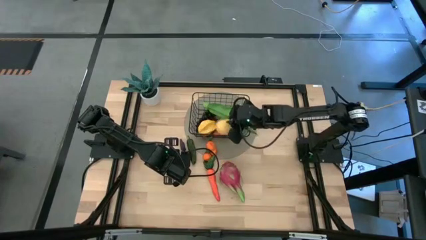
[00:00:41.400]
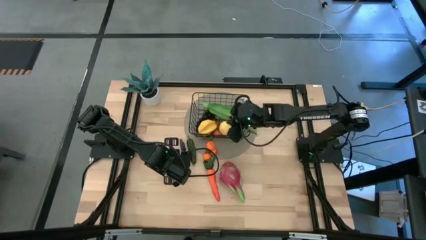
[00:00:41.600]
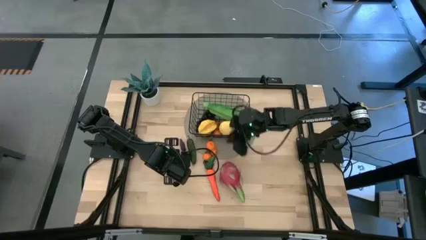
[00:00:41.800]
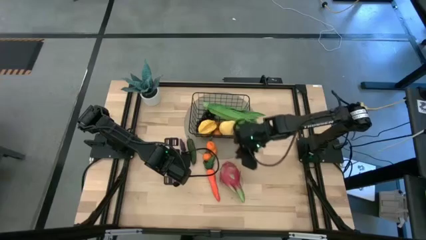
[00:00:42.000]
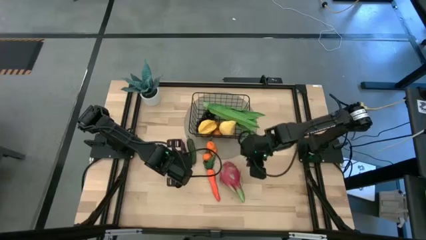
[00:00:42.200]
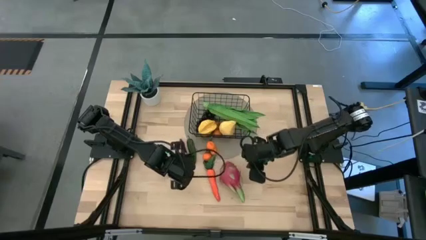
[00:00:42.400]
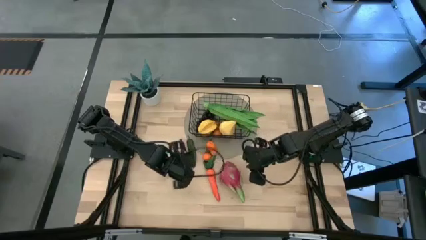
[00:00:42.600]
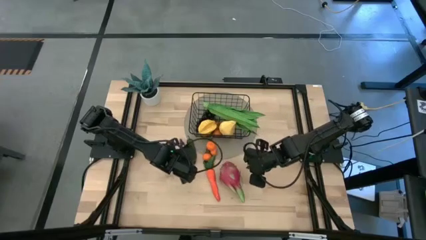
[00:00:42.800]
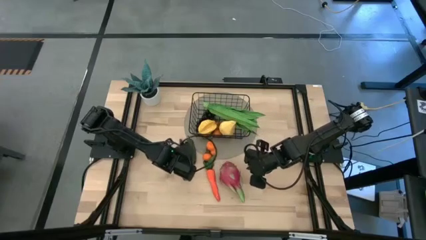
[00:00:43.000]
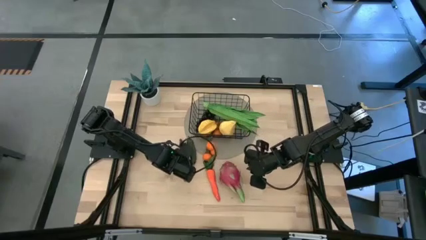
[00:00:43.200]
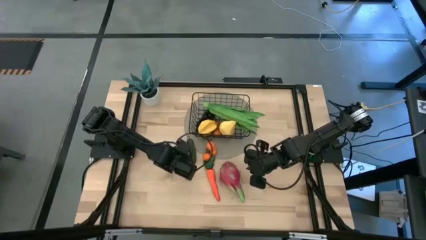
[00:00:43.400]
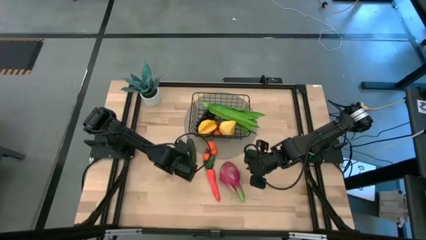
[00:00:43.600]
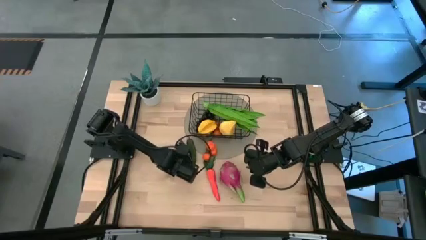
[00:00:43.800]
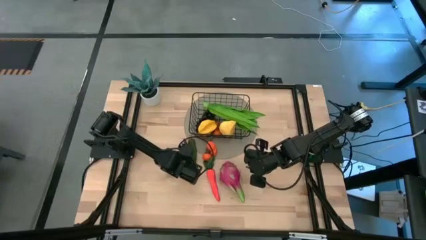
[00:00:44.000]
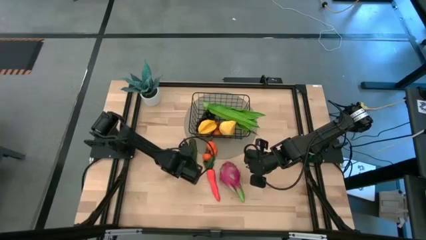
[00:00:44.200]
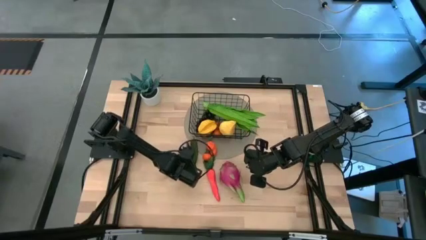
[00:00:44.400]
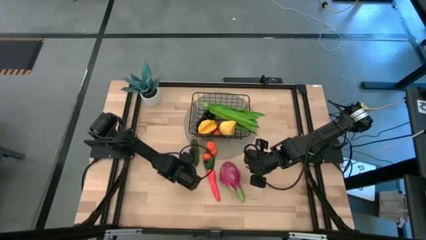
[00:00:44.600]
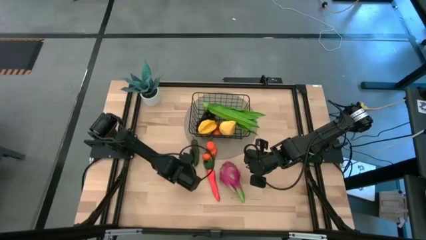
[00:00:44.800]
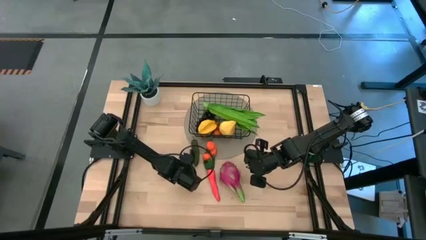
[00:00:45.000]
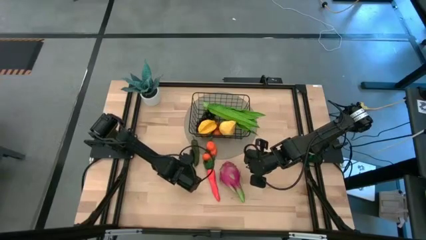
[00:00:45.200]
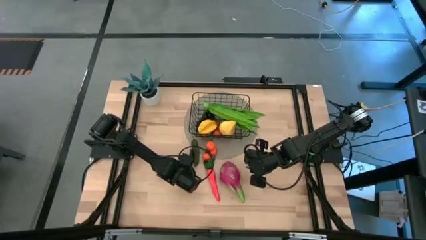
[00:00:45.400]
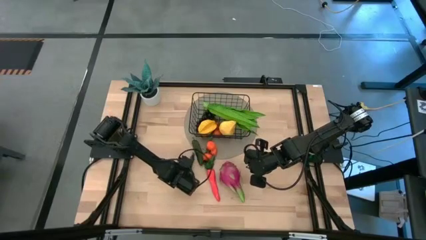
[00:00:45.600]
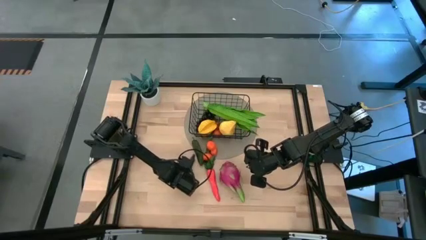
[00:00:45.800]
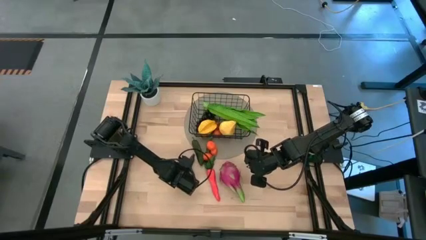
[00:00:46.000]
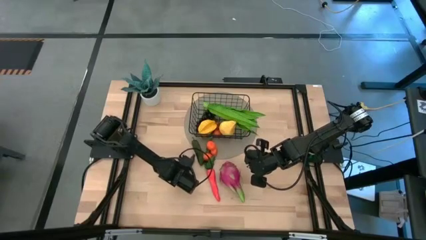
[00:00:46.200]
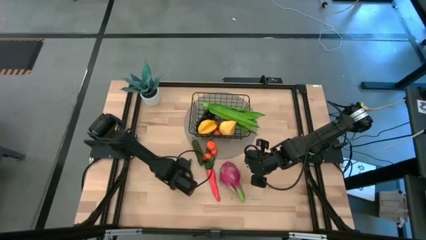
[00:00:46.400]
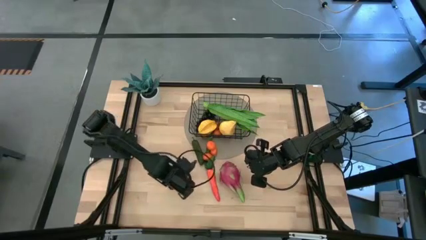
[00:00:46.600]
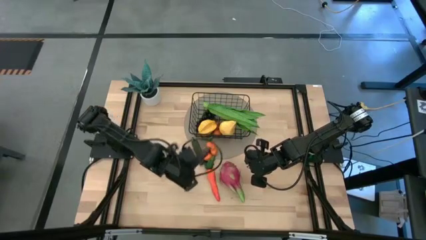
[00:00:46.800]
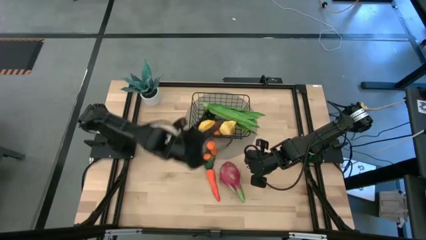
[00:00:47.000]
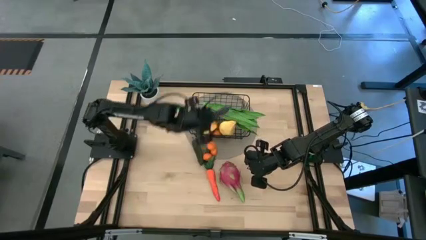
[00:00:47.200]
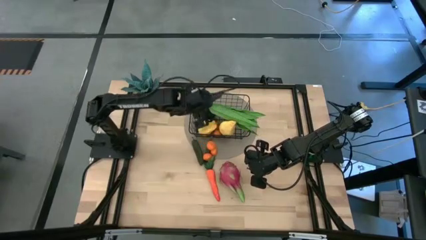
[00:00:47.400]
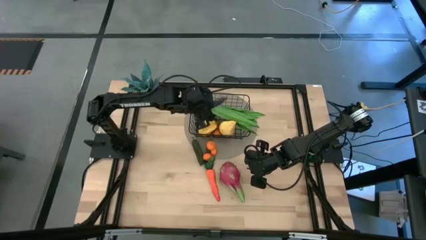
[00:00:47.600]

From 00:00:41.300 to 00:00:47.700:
Task: Build produce basket
Put the eggplant into the wire basket

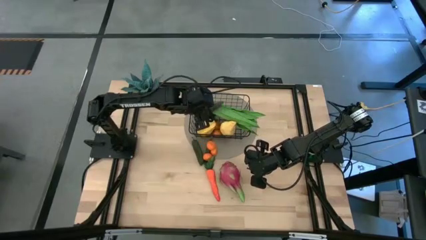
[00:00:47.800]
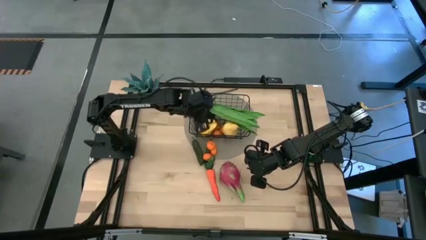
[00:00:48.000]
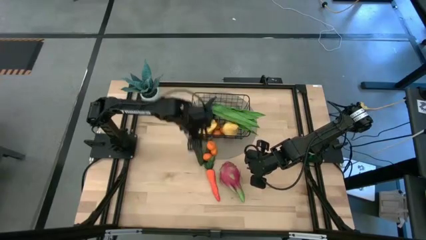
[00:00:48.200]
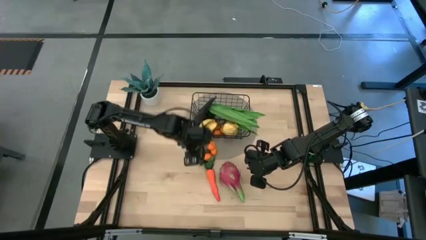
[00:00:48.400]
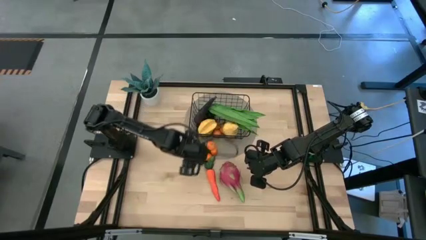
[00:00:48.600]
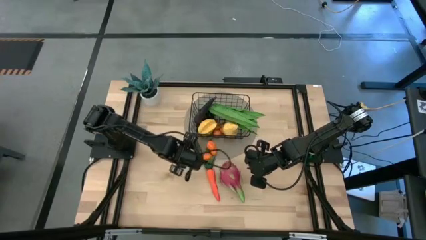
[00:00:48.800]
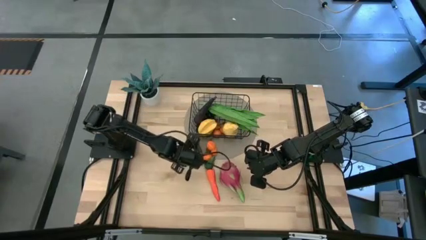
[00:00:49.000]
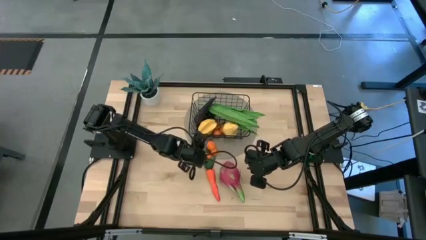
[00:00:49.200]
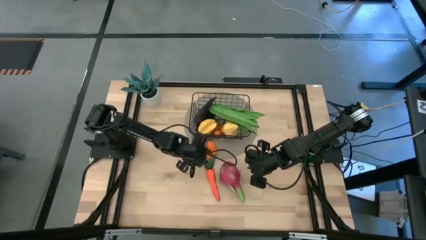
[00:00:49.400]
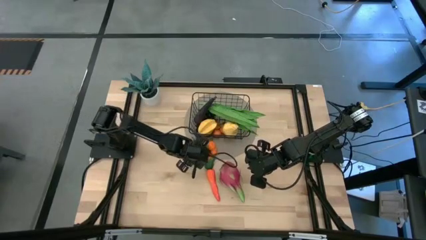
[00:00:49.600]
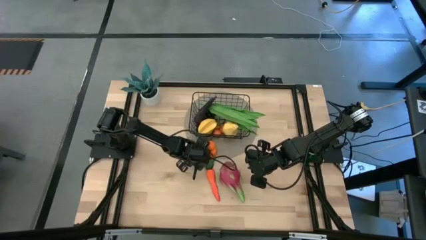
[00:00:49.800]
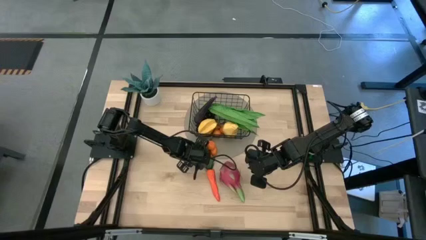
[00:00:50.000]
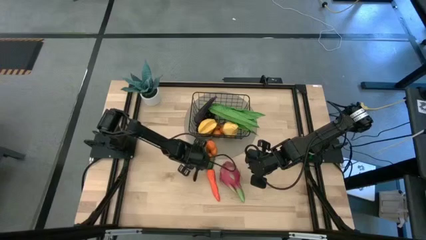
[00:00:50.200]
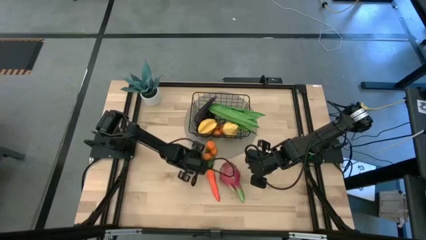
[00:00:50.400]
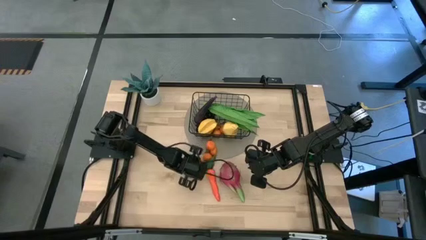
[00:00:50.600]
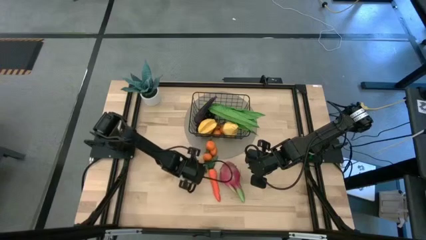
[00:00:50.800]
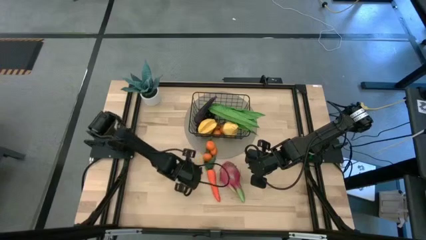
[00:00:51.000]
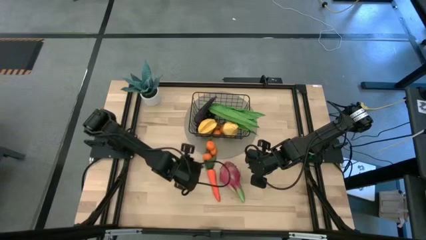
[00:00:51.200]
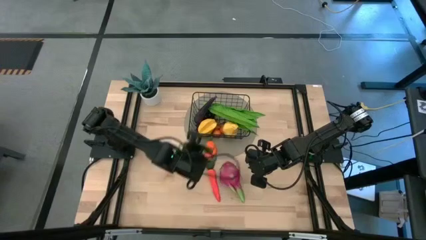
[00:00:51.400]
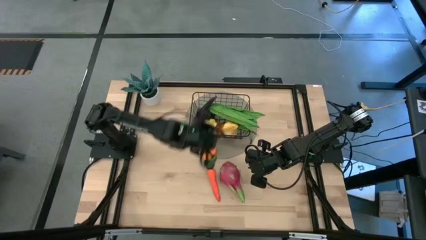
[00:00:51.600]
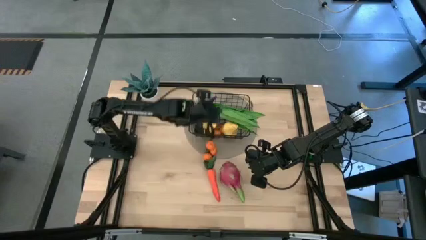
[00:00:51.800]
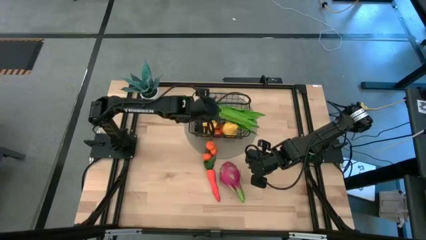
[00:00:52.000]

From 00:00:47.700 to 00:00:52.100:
Put the green chili pepper into the wire basket

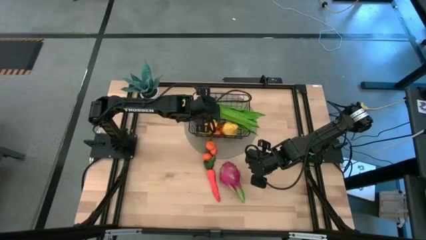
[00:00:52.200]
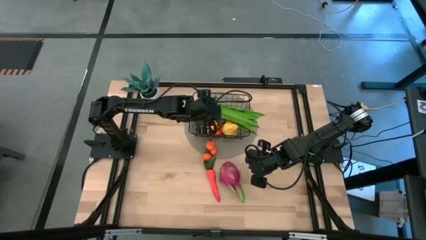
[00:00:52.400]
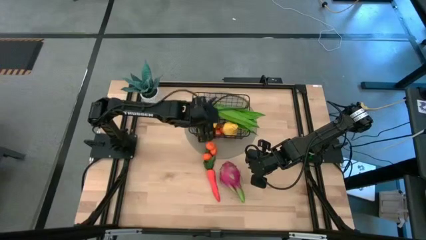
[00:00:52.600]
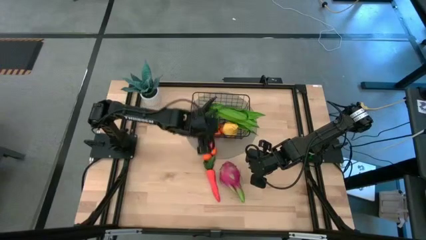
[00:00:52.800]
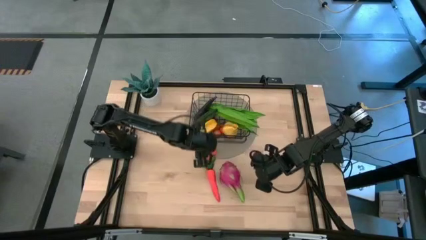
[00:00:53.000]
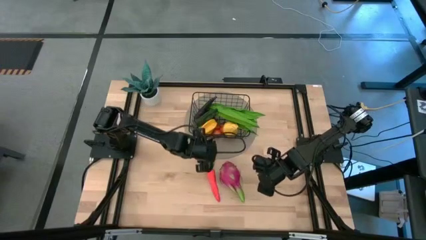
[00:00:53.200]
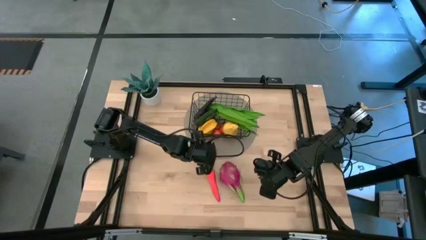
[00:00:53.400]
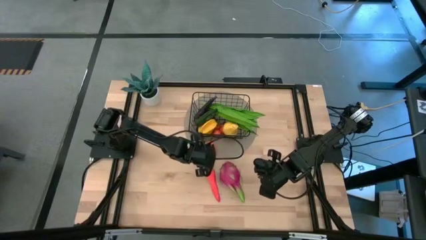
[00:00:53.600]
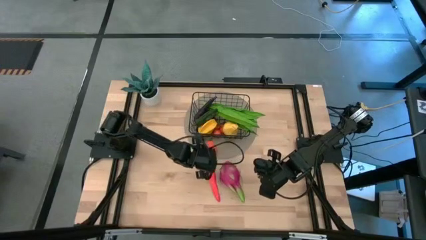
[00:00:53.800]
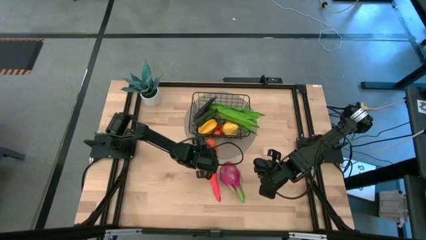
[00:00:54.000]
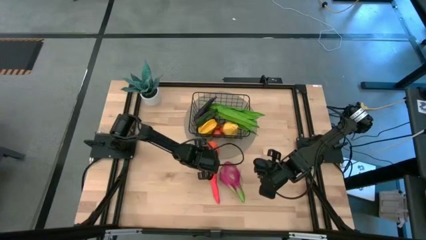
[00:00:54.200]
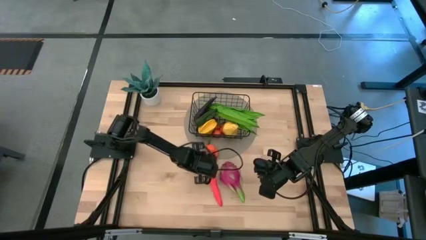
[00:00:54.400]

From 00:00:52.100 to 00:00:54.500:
Put the tangerine into the wire basket

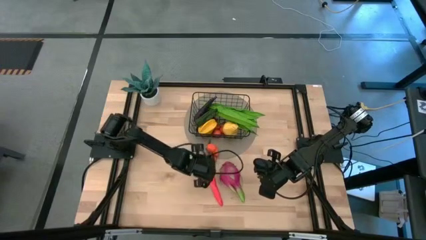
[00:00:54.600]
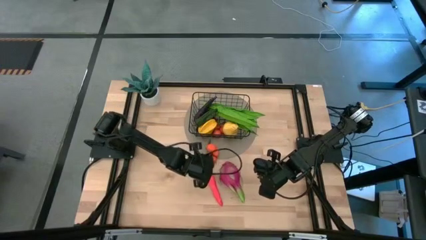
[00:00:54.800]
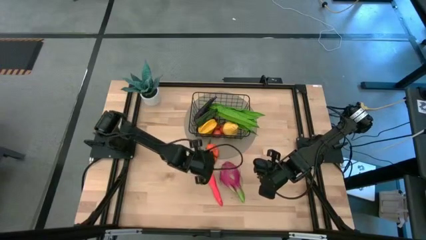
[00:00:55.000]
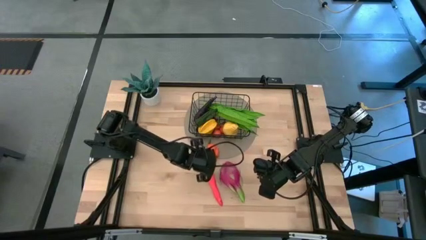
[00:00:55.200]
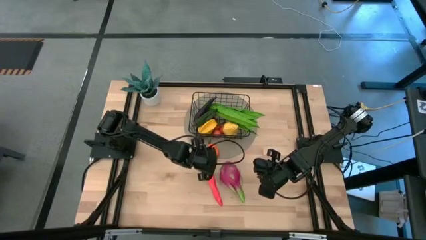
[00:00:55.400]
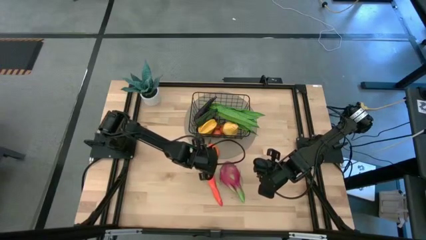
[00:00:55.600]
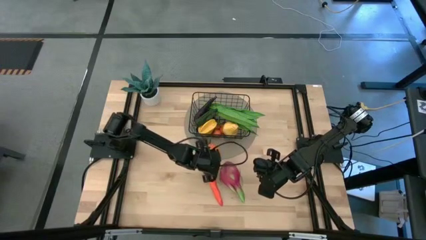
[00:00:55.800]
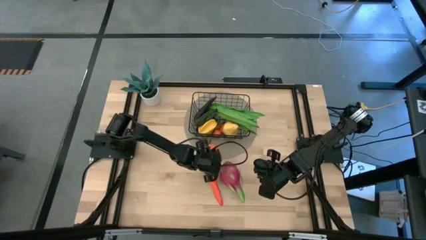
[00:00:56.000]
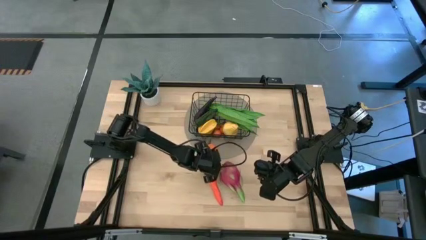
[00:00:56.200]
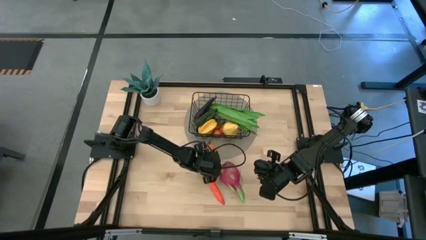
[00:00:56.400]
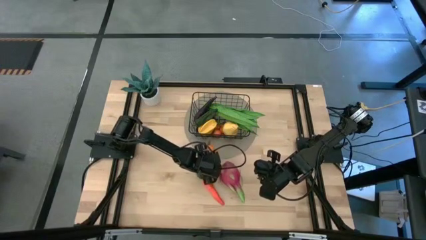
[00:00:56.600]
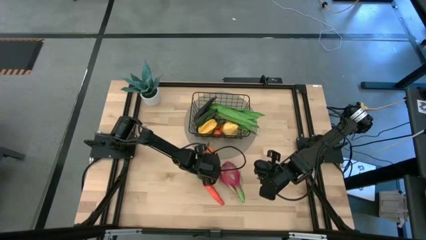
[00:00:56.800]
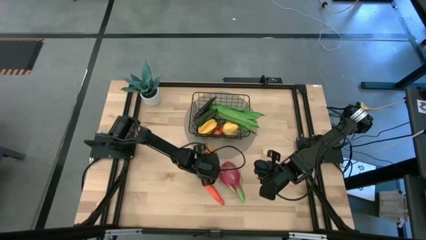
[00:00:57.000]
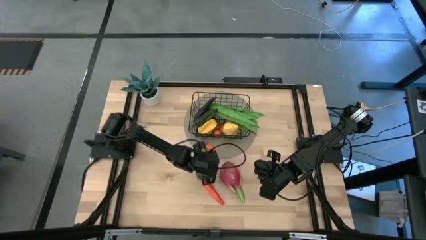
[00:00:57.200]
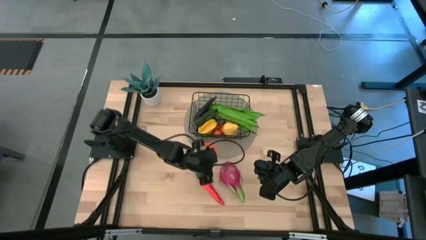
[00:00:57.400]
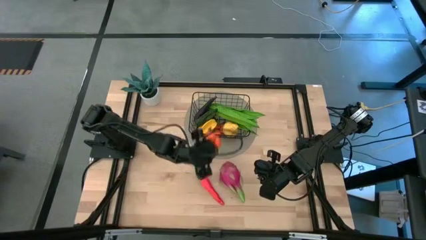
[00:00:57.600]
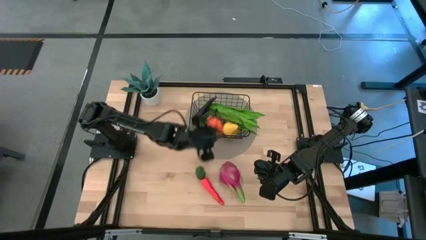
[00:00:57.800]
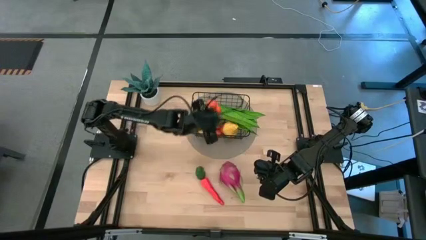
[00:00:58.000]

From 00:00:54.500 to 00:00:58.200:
Put the tangerine into the wire basket
